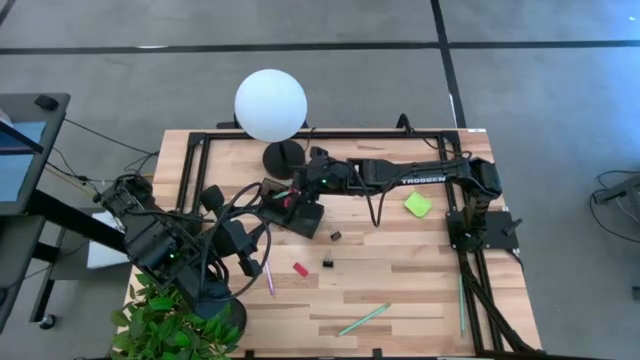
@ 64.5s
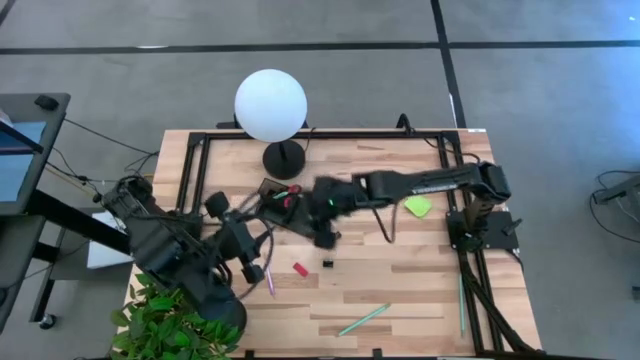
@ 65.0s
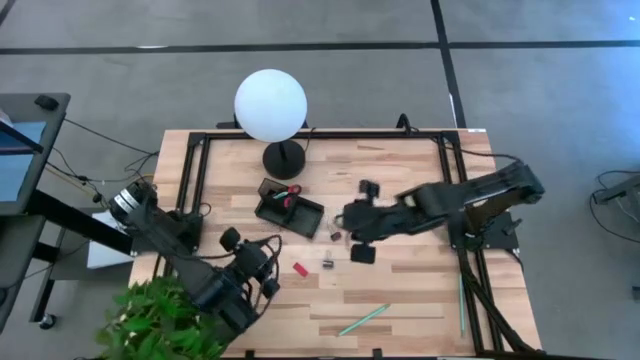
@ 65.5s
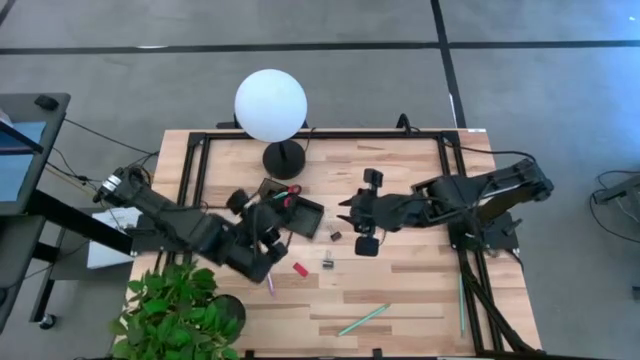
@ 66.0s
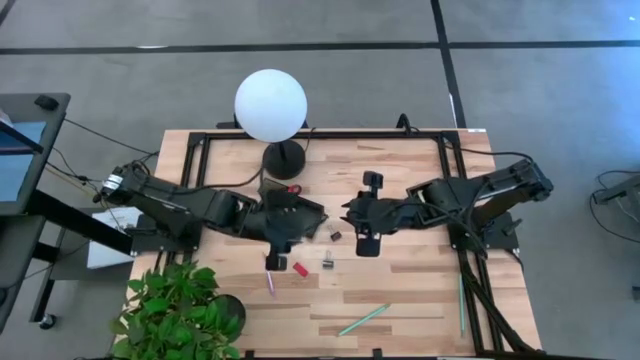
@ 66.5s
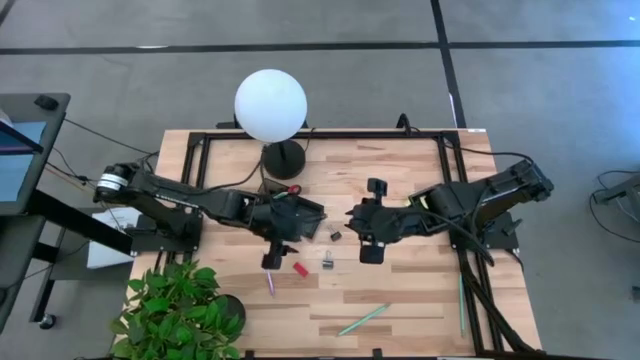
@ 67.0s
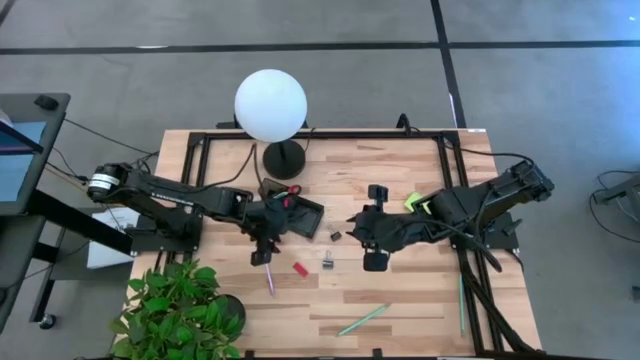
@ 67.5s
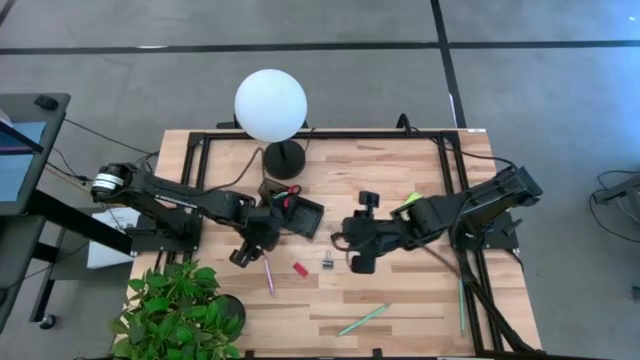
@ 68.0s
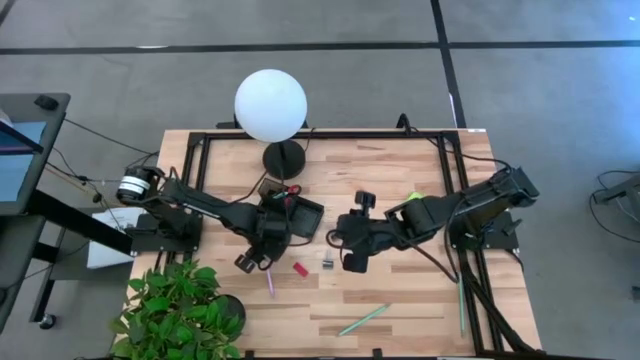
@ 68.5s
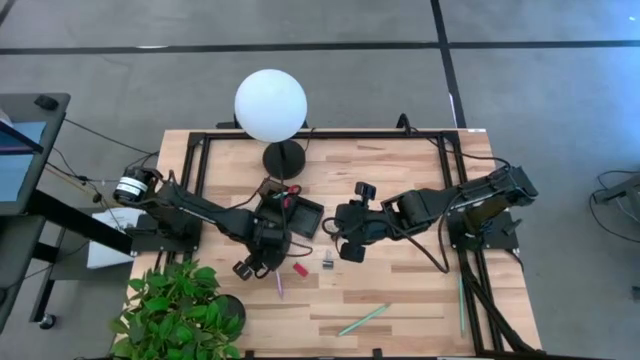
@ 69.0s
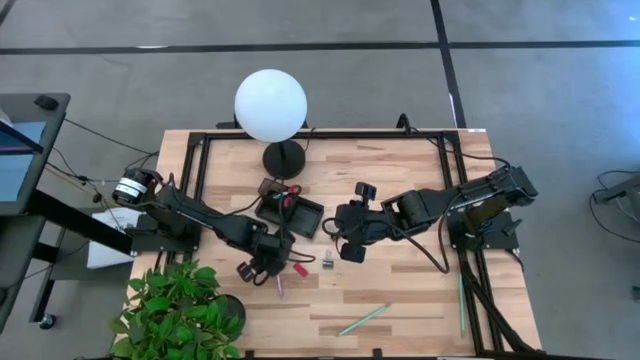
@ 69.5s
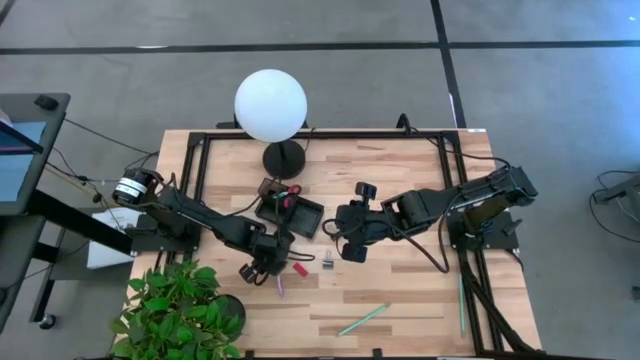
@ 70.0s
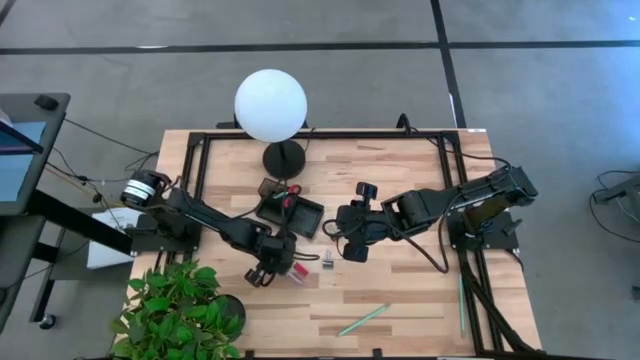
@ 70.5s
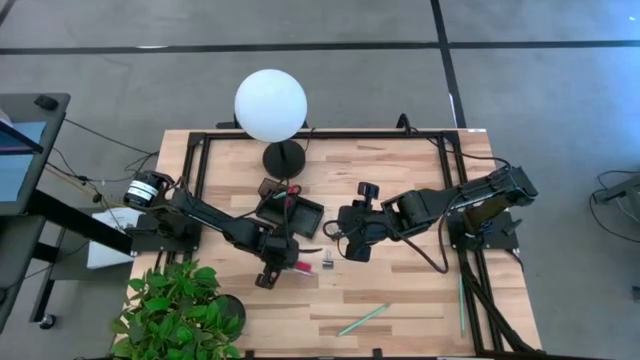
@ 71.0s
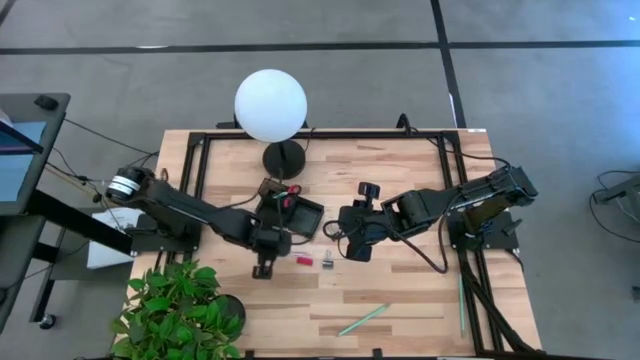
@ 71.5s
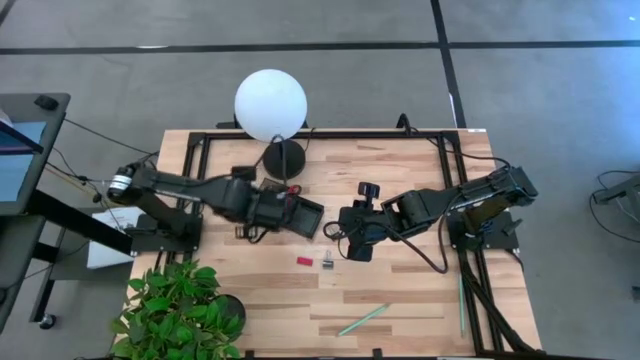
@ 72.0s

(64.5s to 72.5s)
Task: Pick and place office supplies into organizer
Put the purple pen into the black desk organizer

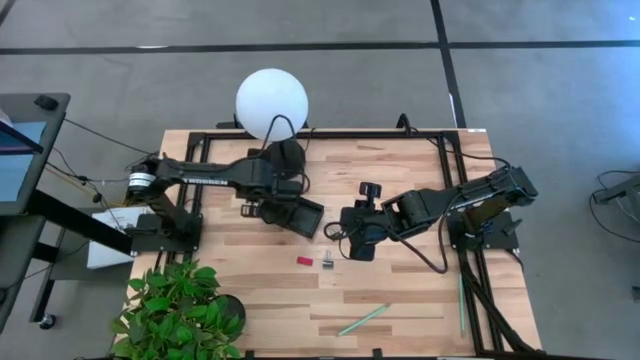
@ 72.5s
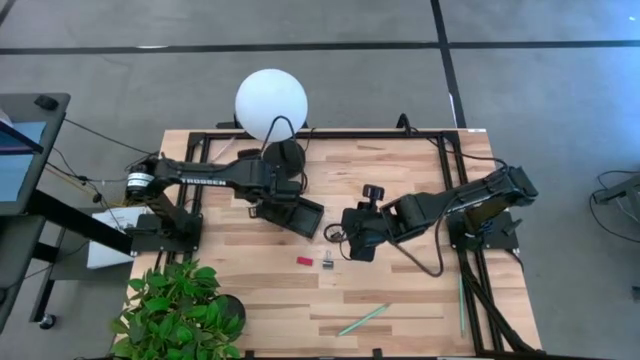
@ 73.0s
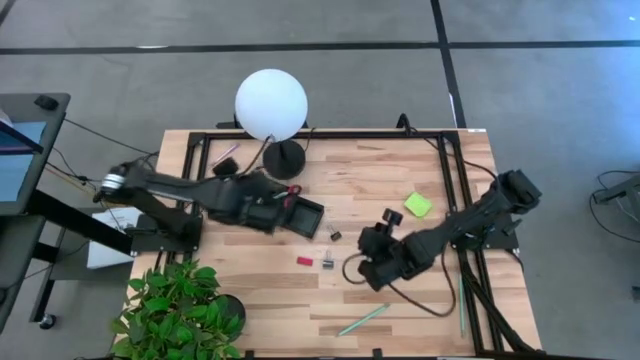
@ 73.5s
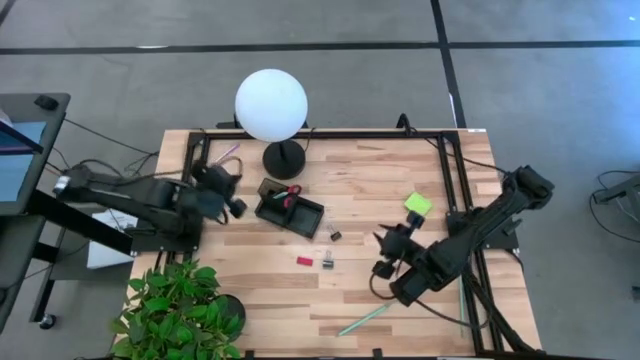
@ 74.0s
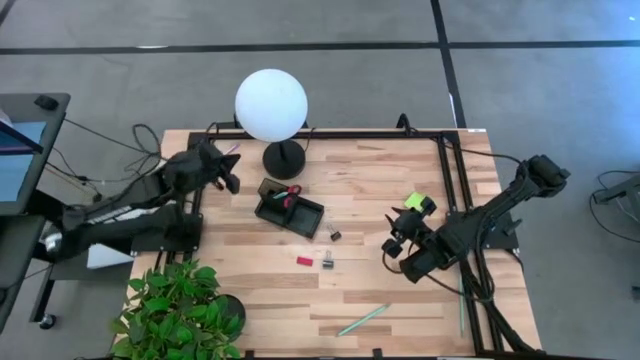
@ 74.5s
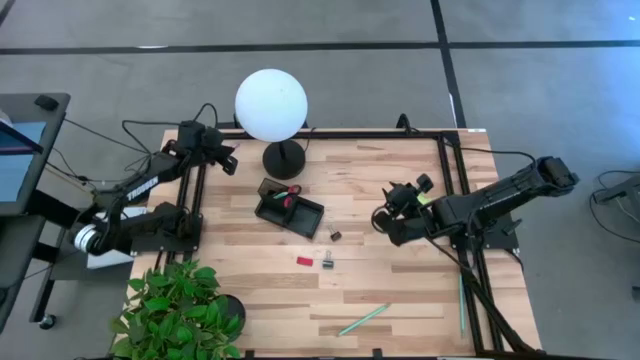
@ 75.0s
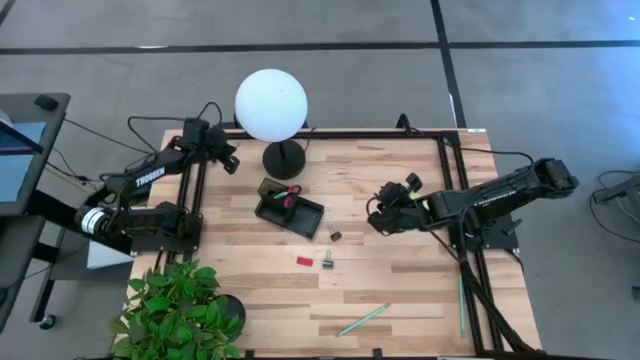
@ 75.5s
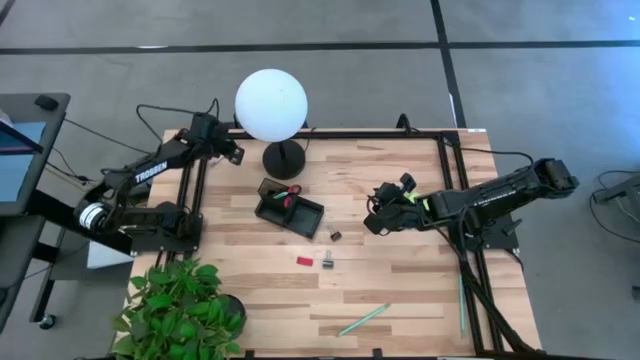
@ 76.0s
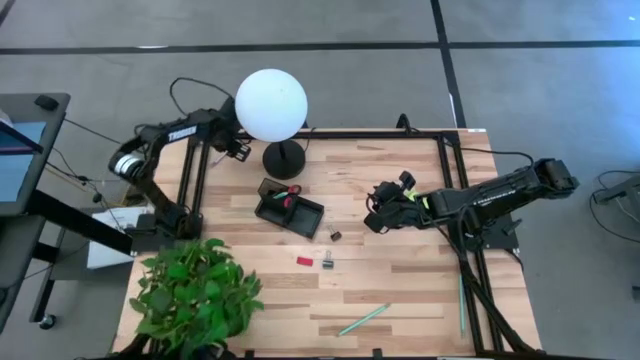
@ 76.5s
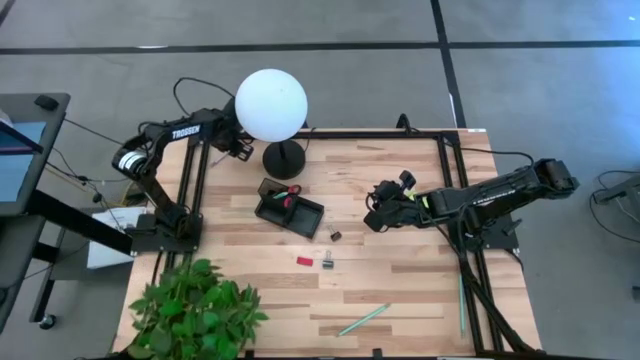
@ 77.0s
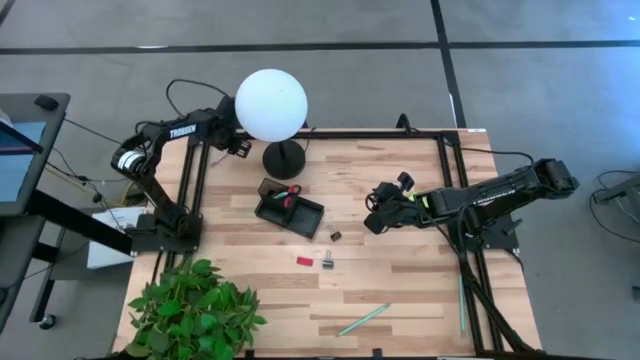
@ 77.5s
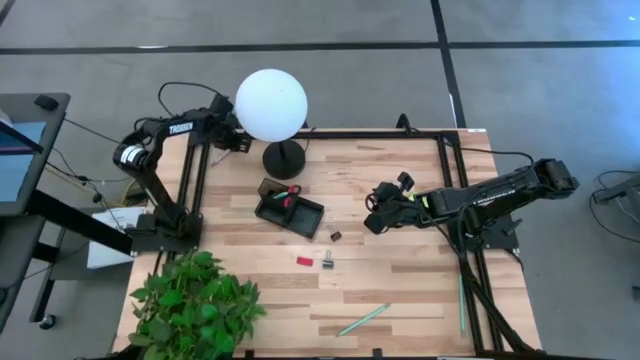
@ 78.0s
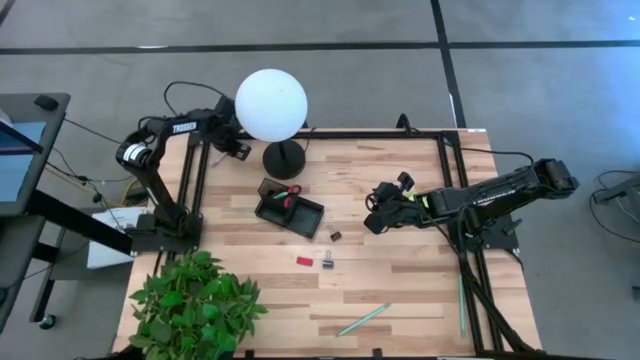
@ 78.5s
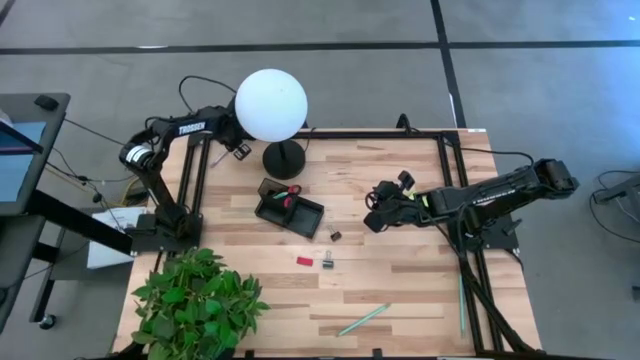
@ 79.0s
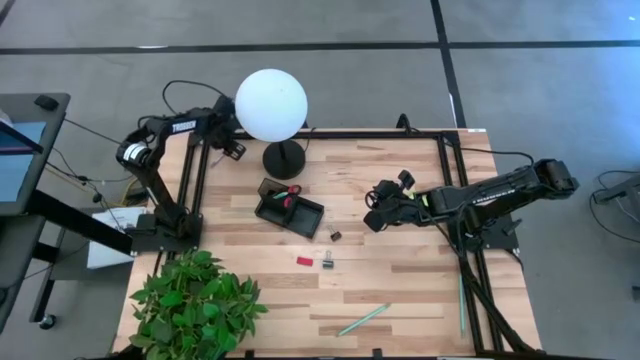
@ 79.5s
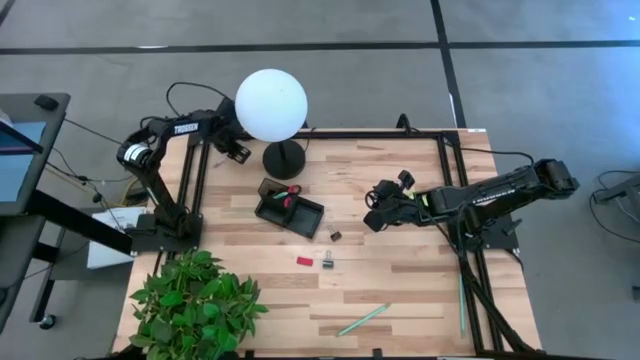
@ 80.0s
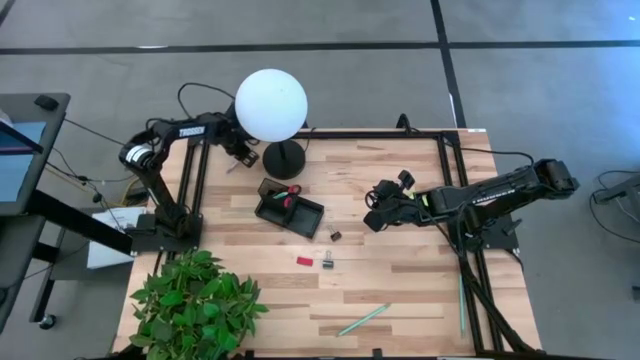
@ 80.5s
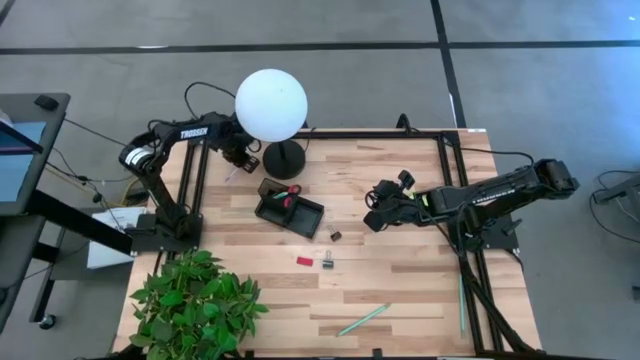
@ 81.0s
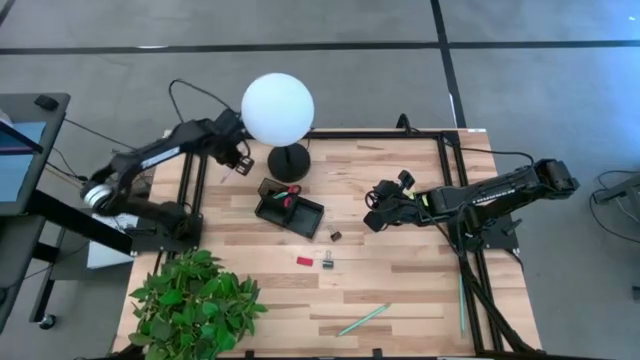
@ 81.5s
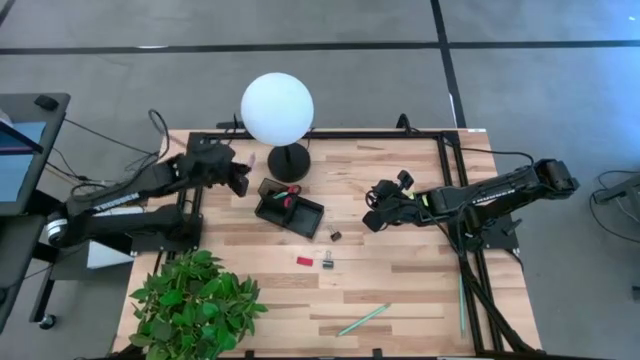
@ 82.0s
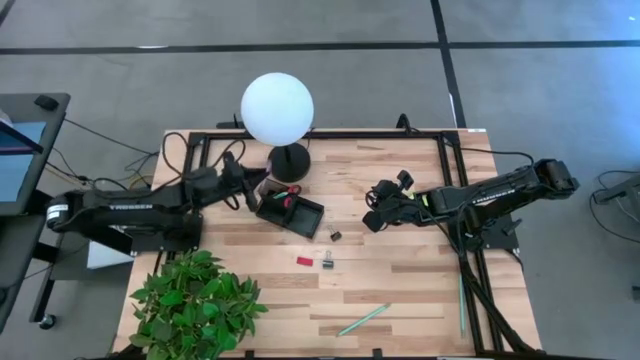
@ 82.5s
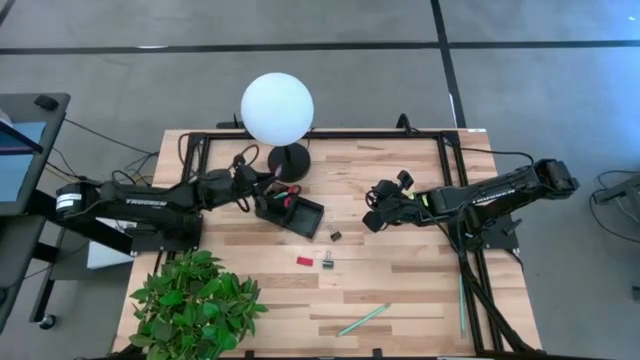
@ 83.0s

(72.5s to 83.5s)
Put the purple pen into the black desk organizer

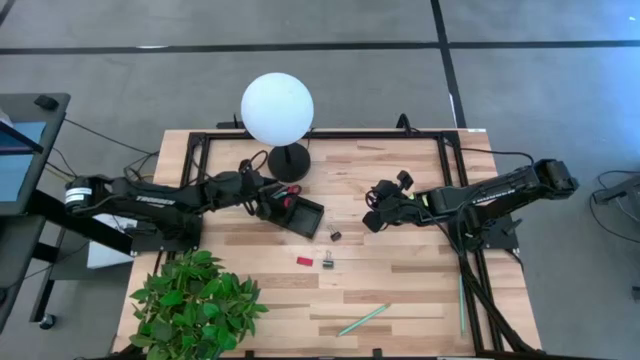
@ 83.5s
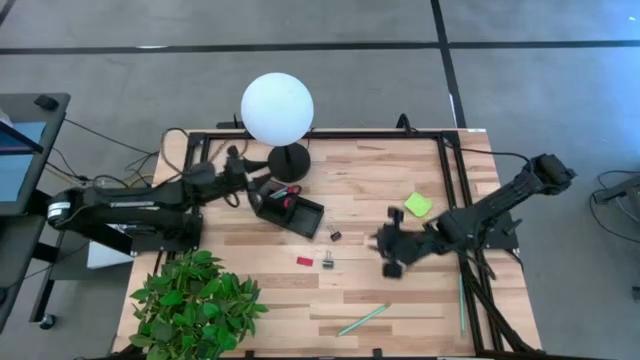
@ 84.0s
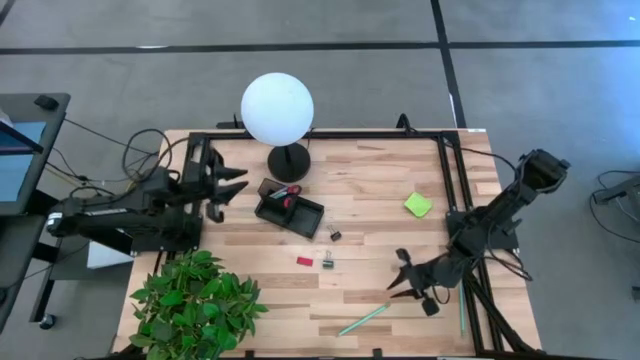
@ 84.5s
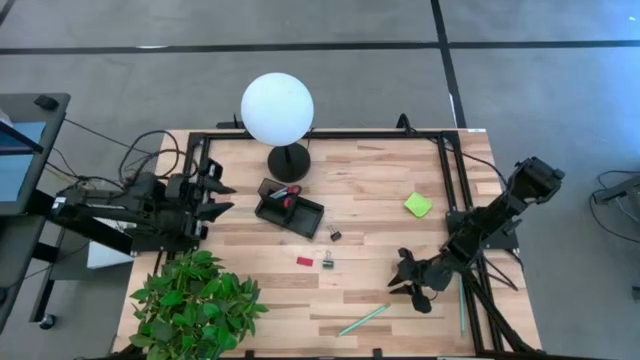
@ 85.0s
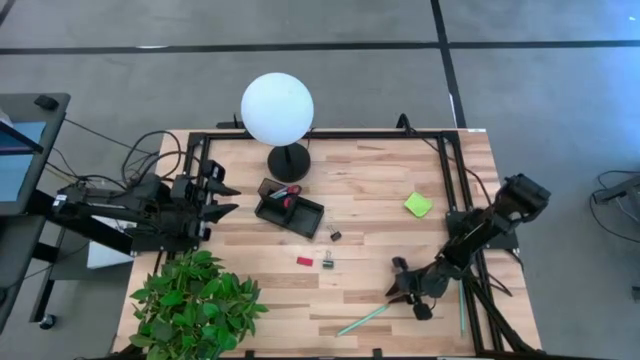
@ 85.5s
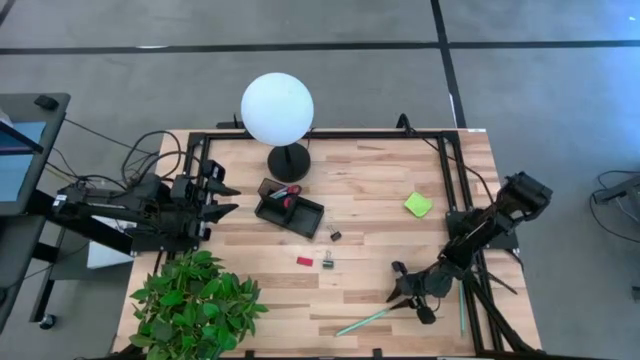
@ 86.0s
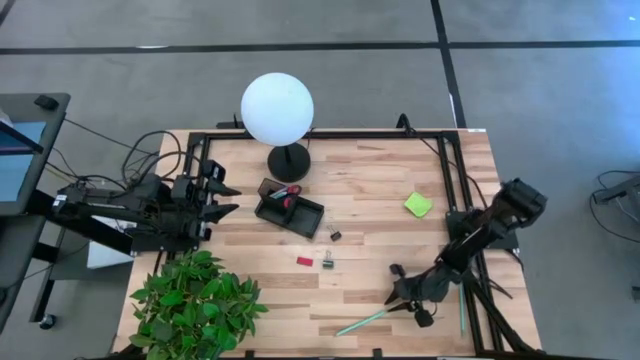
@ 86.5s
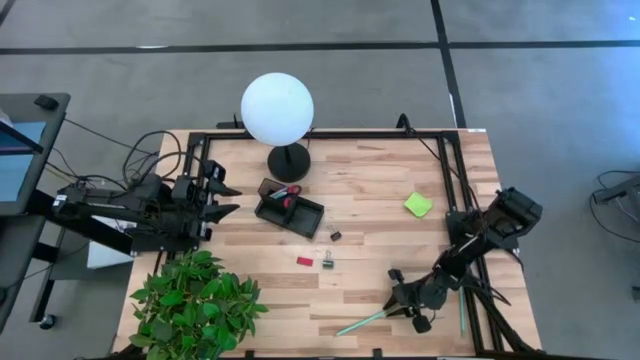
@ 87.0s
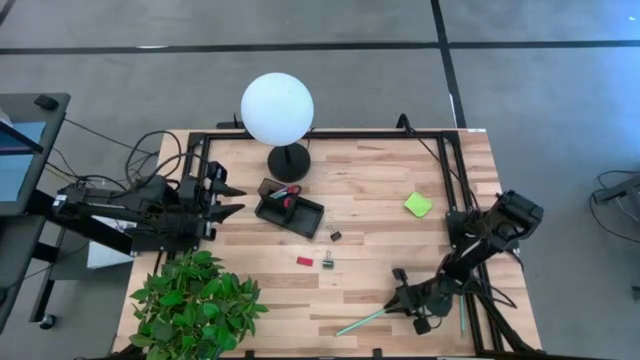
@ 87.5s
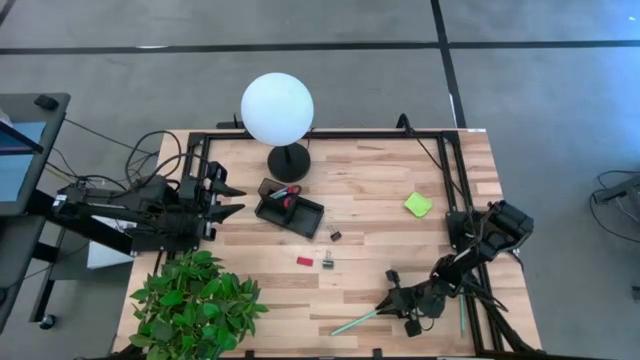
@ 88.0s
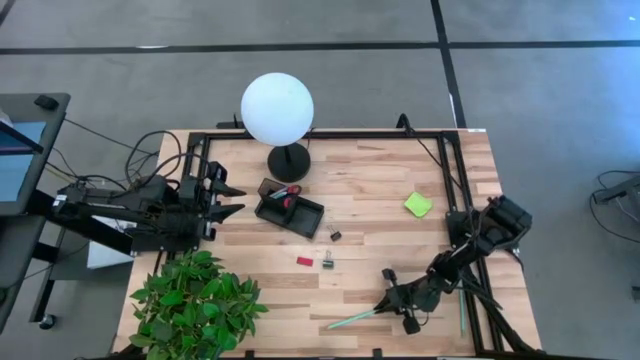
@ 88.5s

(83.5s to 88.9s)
Put the left blue pencil into the black desk organizer
